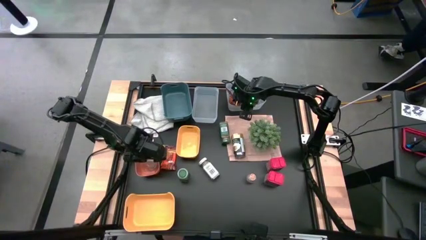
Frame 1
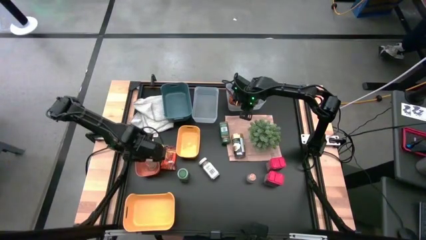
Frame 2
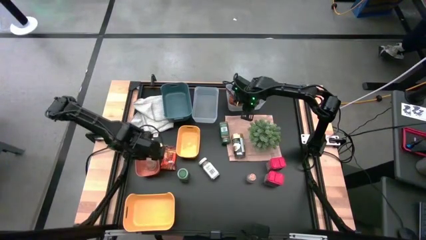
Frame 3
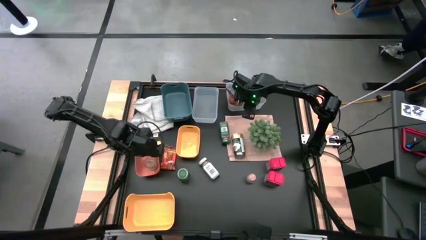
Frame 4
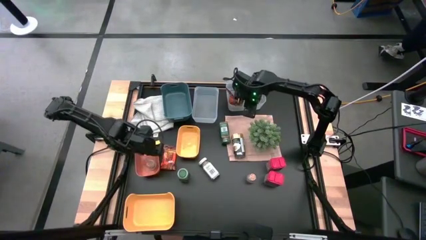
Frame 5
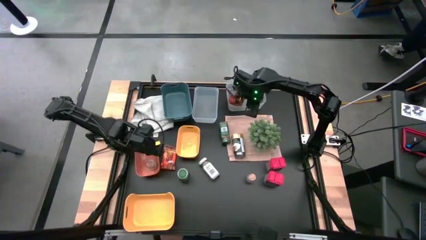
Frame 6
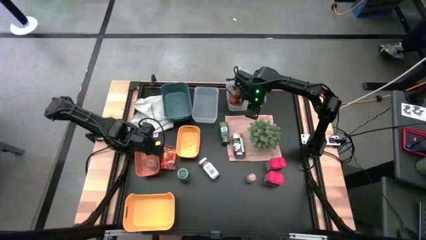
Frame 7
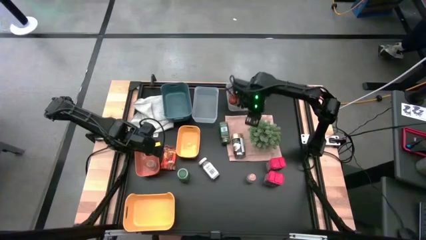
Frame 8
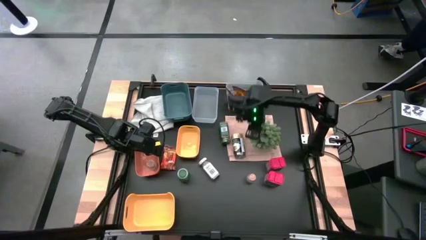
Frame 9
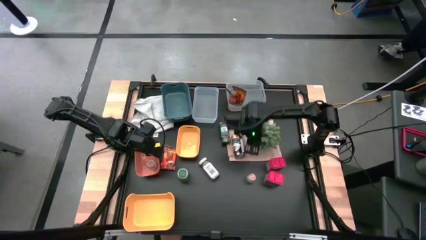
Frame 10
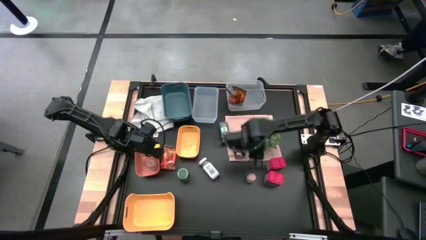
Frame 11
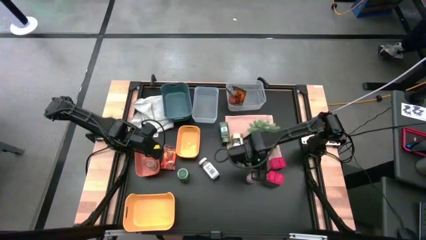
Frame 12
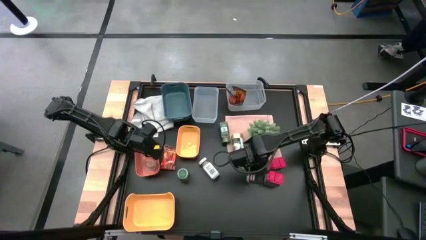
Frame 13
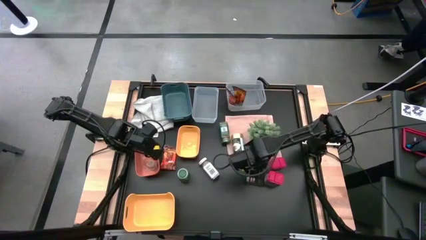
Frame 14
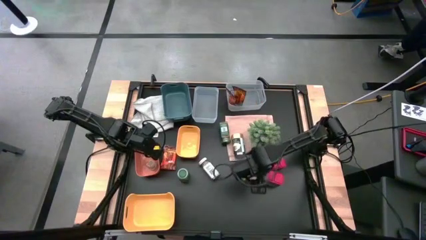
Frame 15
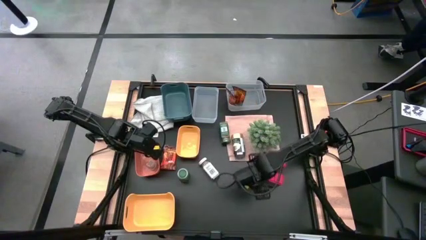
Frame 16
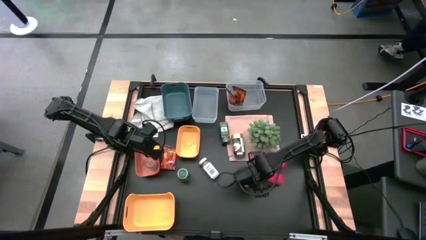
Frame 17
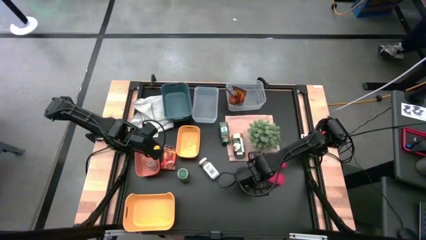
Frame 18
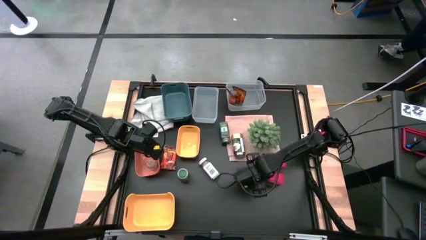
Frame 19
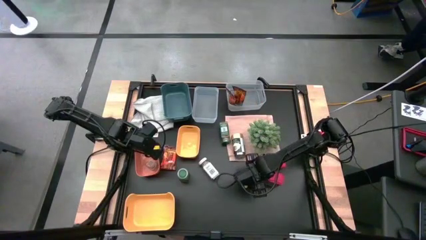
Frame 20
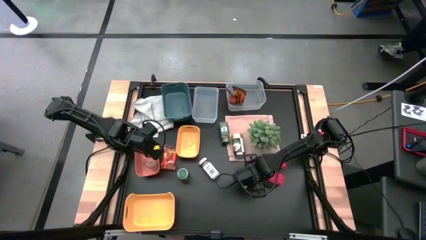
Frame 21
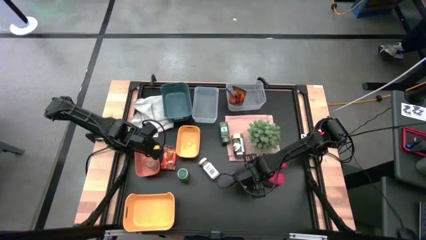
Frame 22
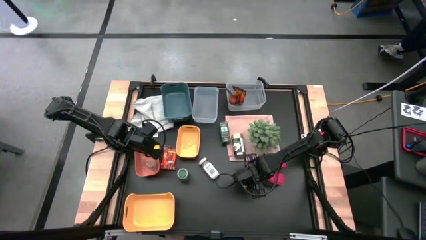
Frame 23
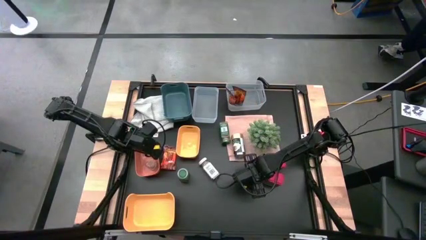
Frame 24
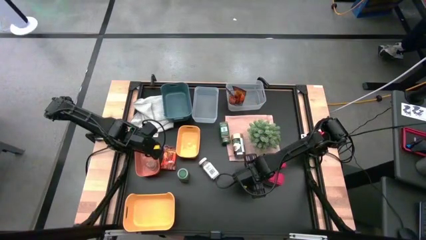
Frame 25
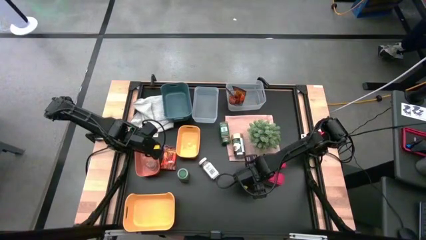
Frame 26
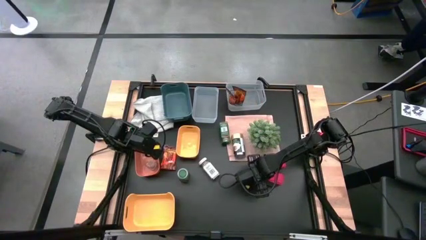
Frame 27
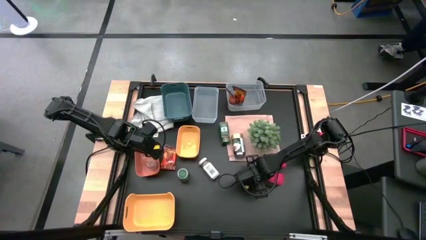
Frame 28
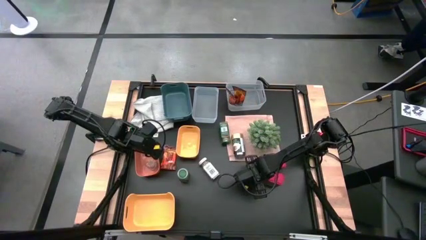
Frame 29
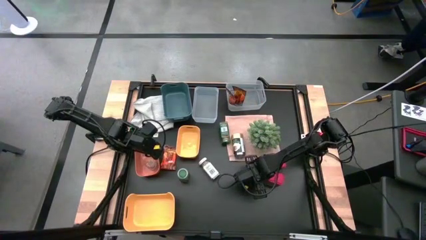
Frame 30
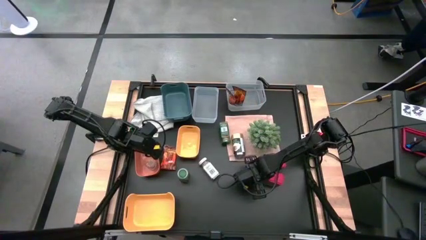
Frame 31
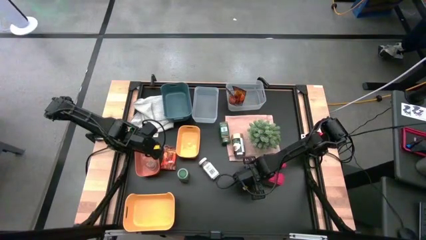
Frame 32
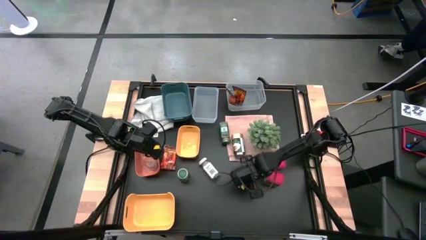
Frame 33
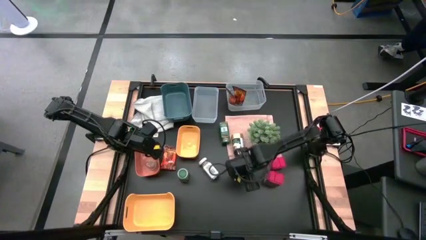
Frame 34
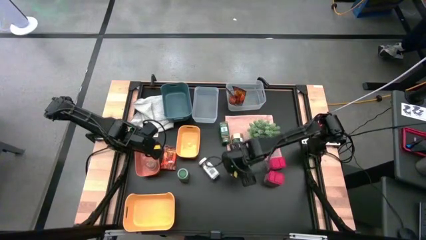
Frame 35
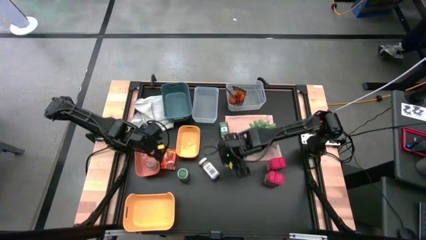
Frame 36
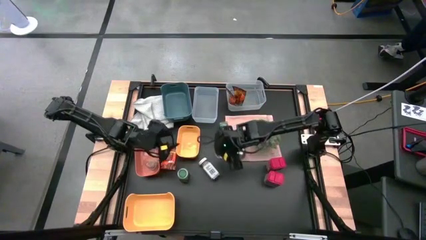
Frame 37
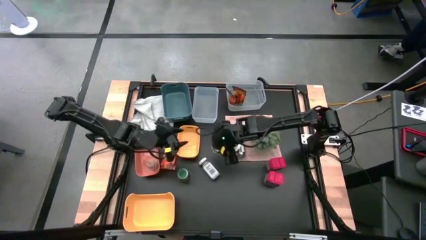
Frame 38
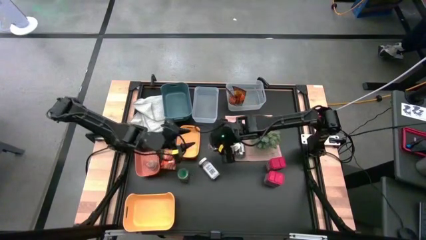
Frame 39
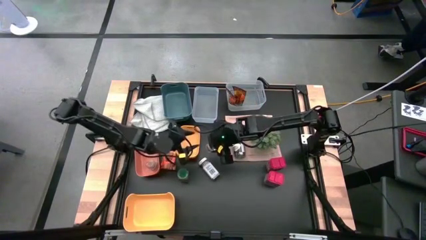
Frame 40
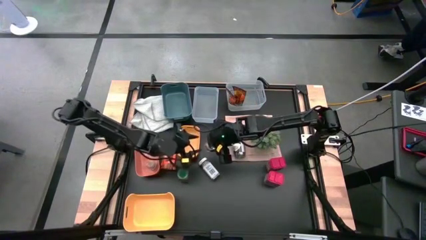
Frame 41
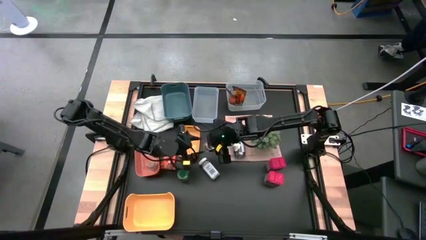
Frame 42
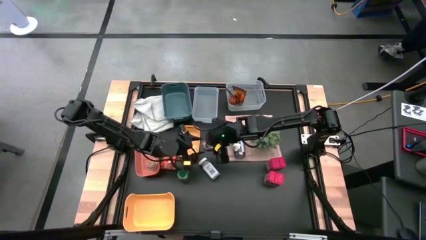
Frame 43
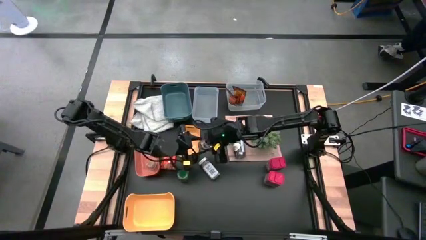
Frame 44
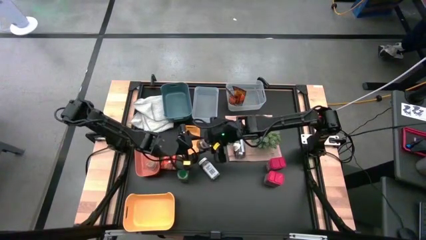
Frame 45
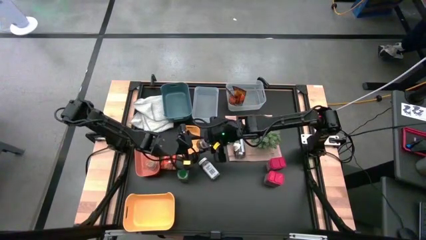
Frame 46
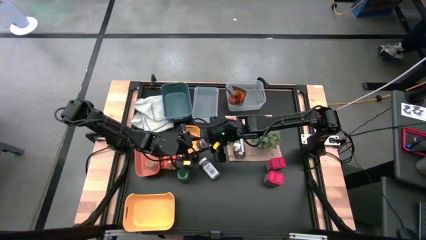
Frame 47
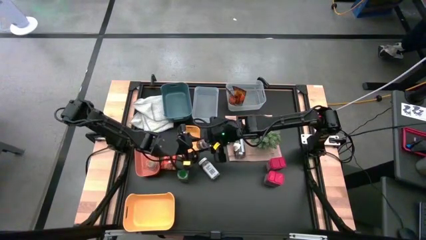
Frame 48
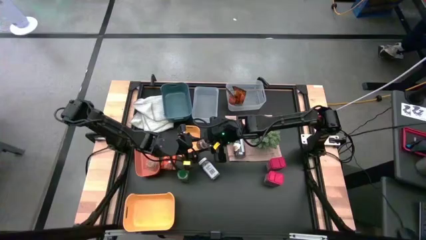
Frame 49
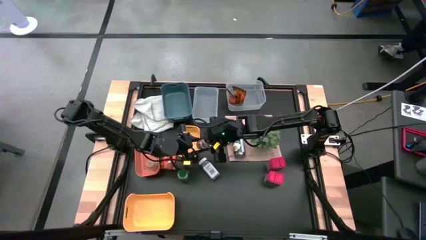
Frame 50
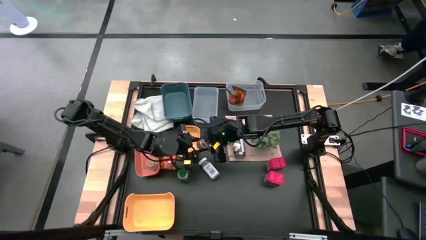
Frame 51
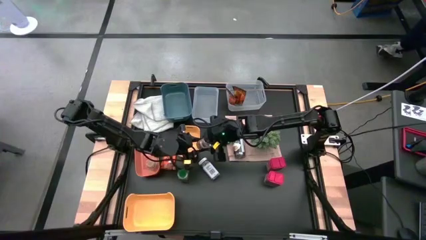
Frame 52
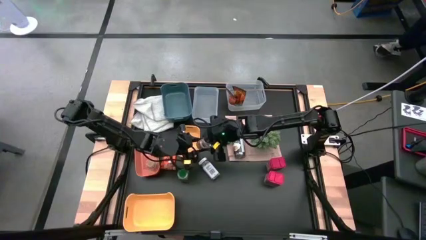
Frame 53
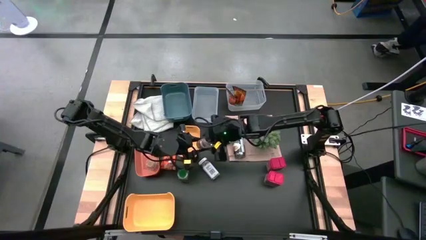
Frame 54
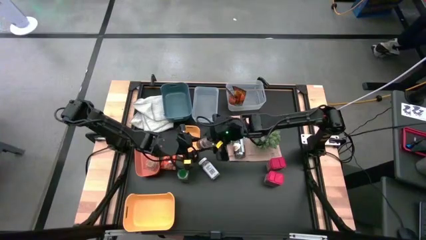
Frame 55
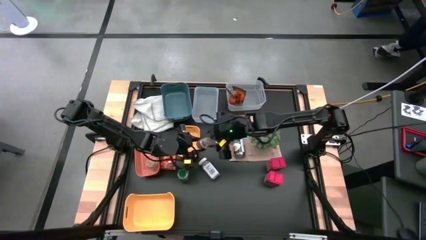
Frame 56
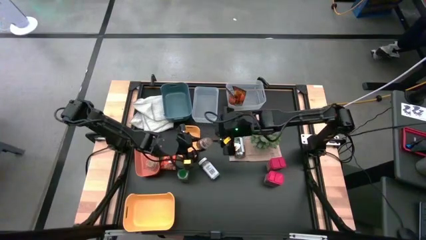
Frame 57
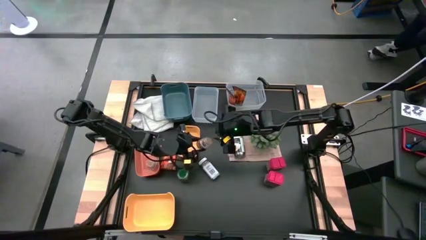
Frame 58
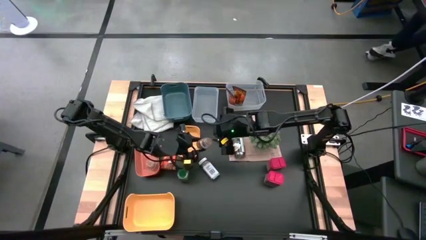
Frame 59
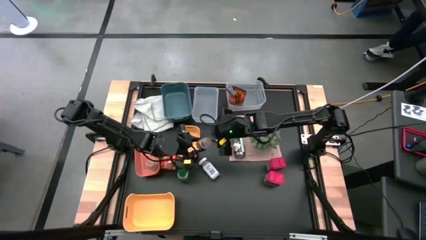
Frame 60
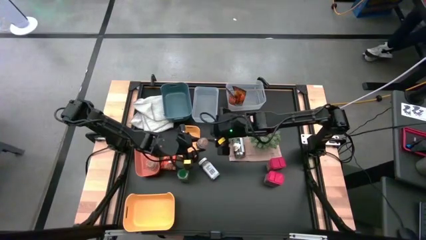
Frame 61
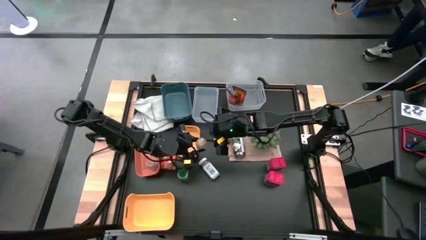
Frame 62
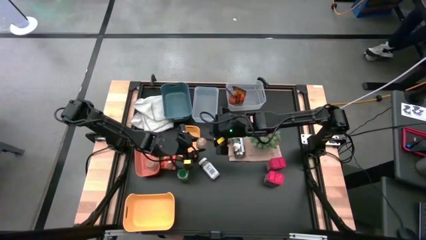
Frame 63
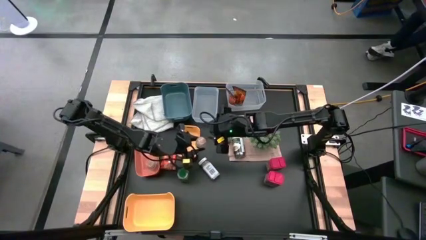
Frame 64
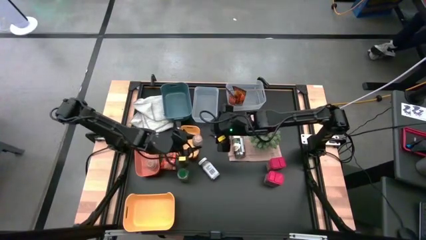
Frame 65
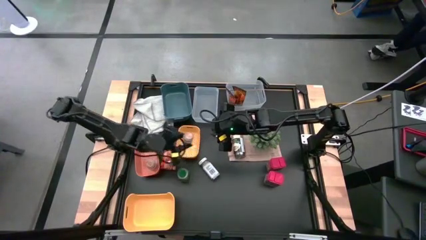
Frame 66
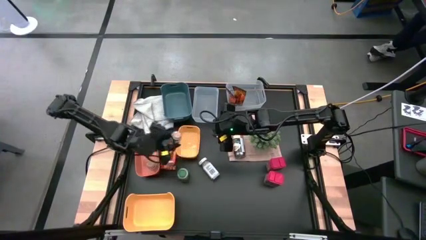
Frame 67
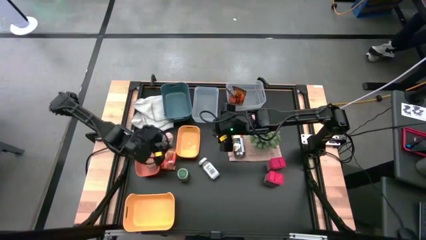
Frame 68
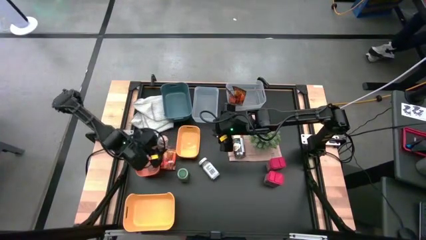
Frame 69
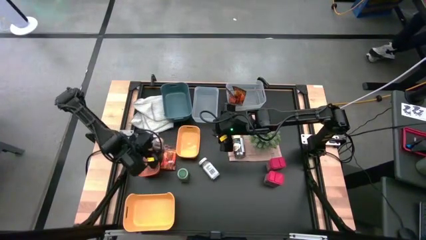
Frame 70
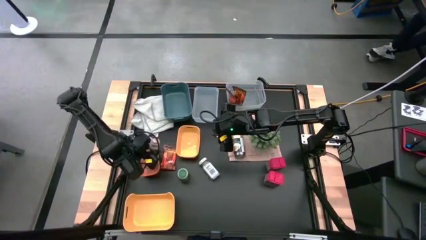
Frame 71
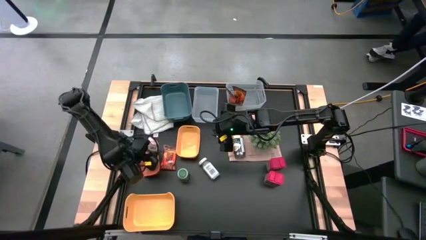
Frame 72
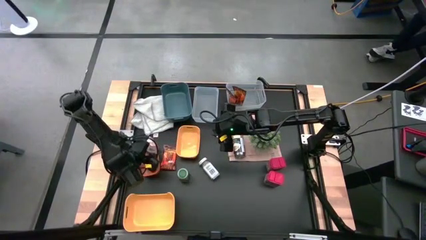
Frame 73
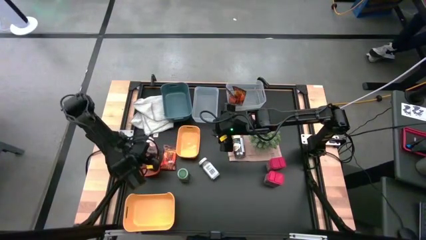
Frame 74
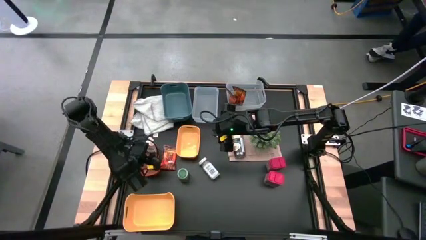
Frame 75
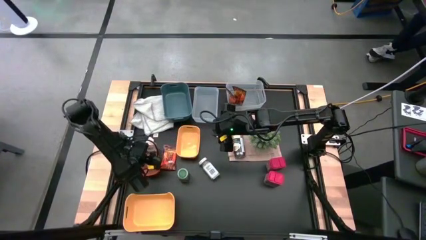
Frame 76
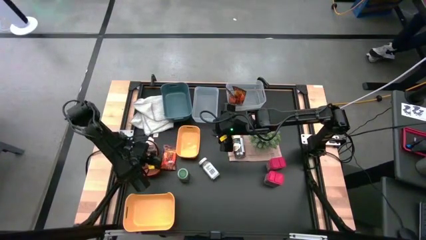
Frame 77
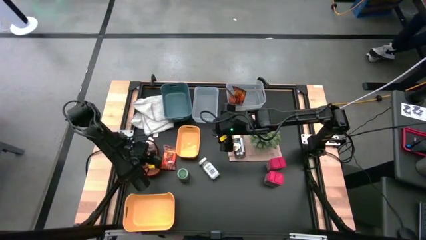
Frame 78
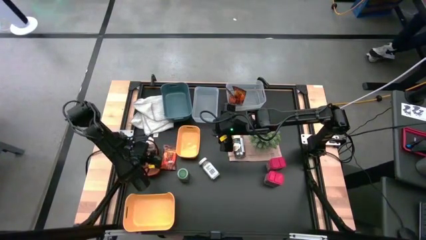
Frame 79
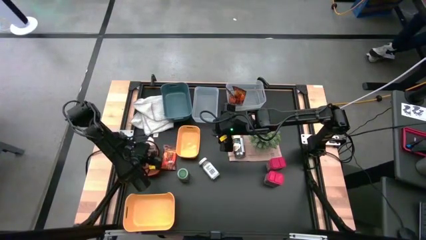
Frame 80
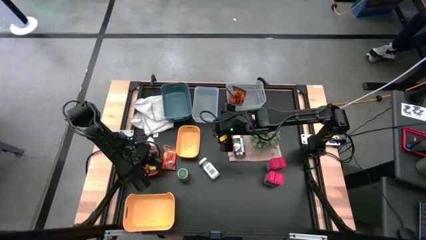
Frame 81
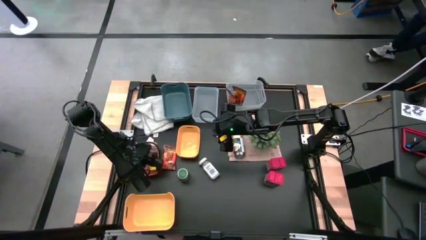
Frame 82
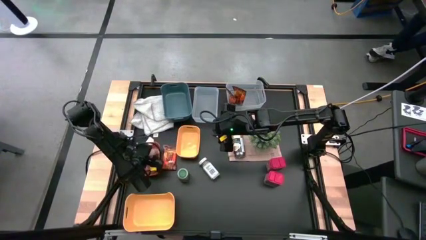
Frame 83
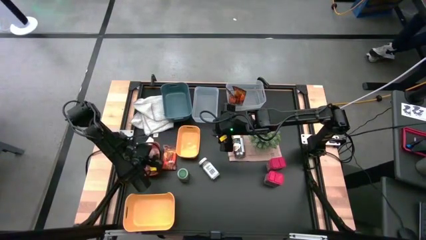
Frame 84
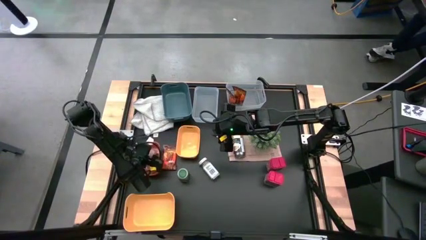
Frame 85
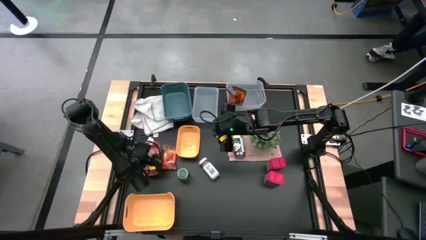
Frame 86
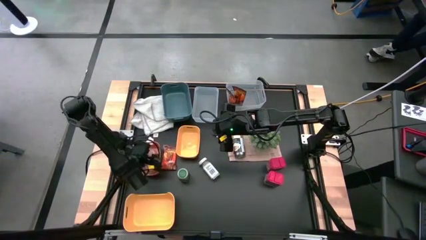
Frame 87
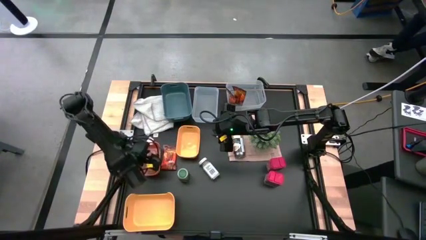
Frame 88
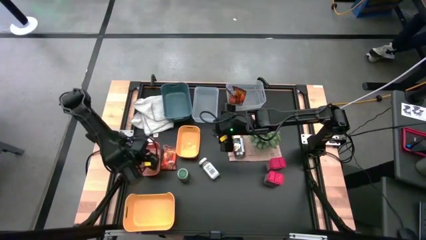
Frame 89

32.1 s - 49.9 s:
Task: Sort spices by type
Put the brown seasoning bottle into the orange bin
